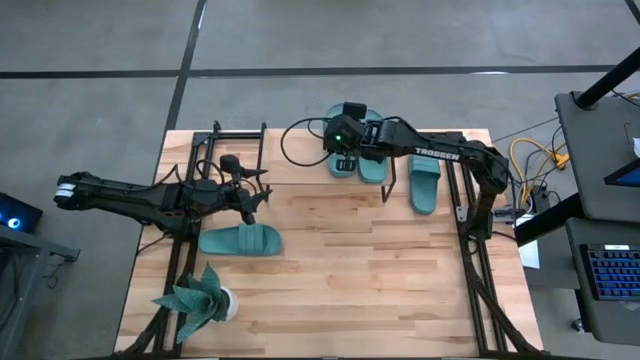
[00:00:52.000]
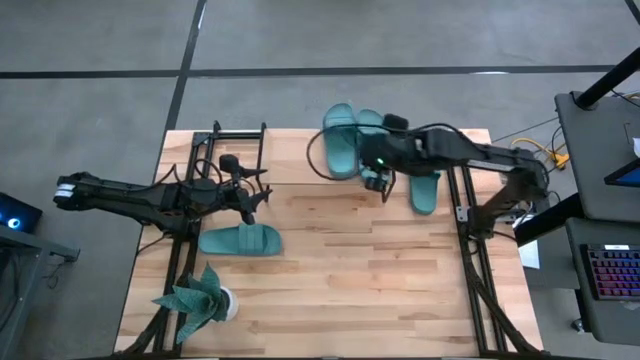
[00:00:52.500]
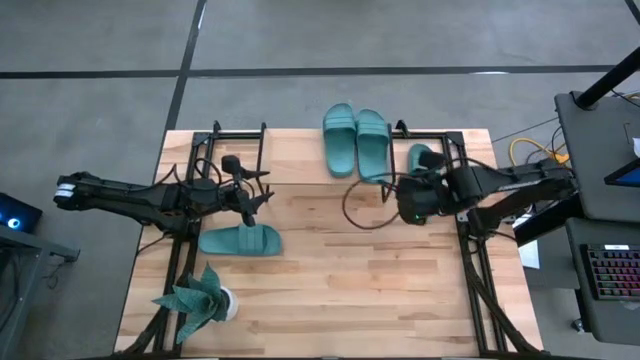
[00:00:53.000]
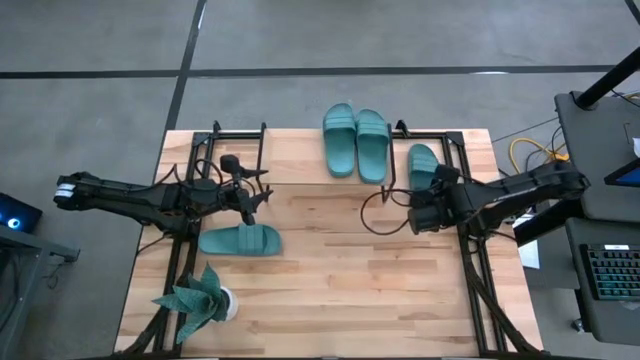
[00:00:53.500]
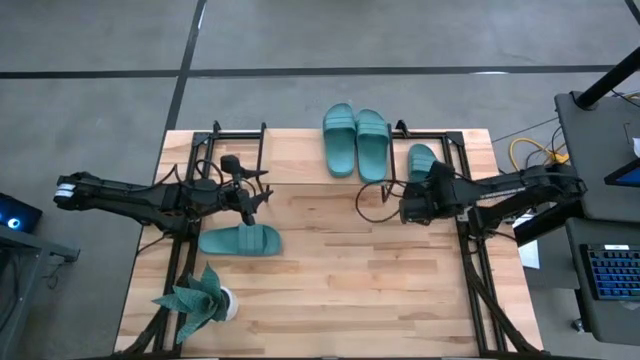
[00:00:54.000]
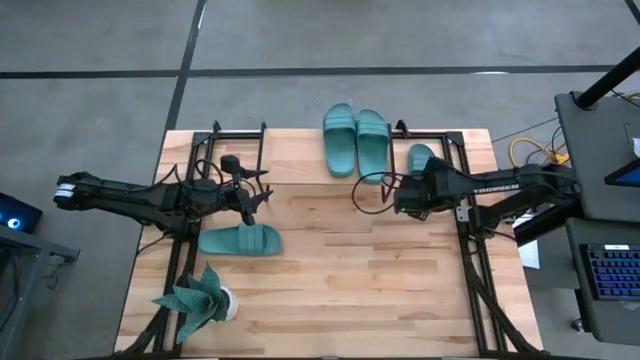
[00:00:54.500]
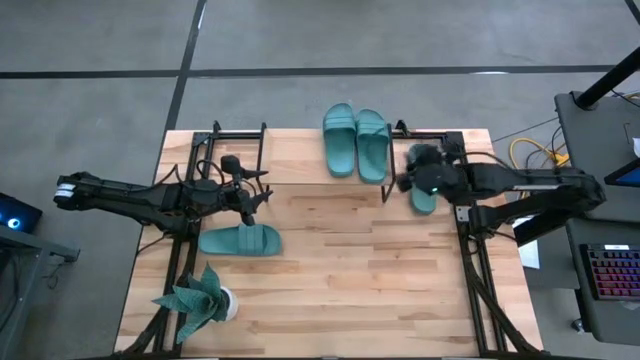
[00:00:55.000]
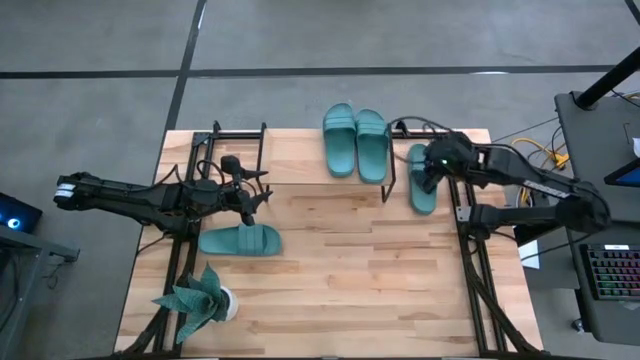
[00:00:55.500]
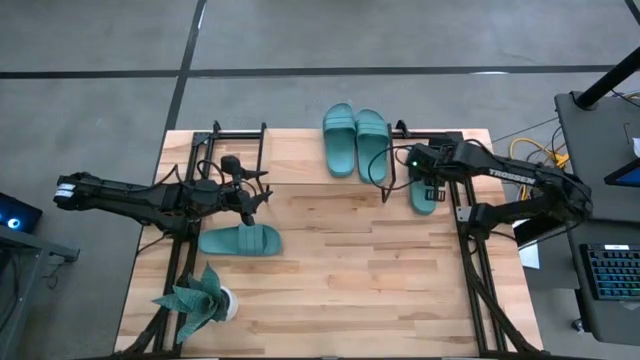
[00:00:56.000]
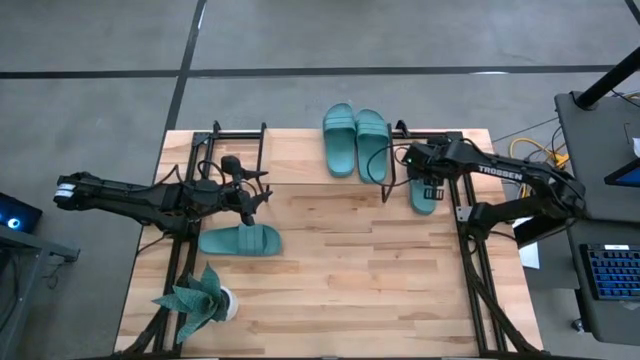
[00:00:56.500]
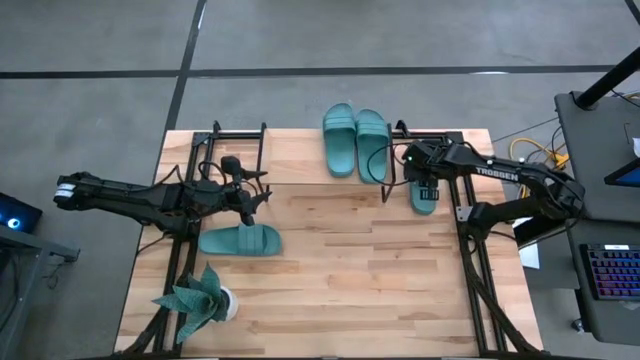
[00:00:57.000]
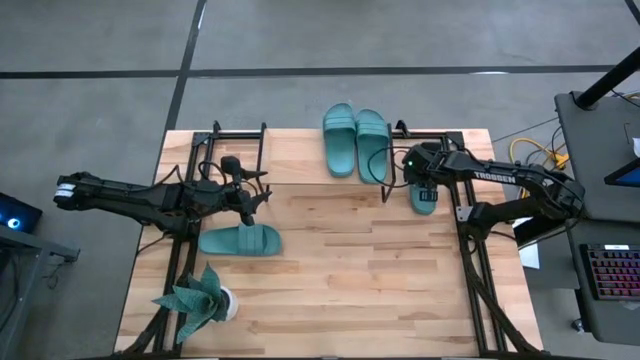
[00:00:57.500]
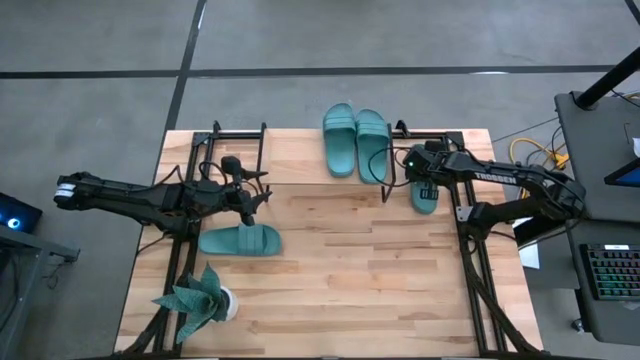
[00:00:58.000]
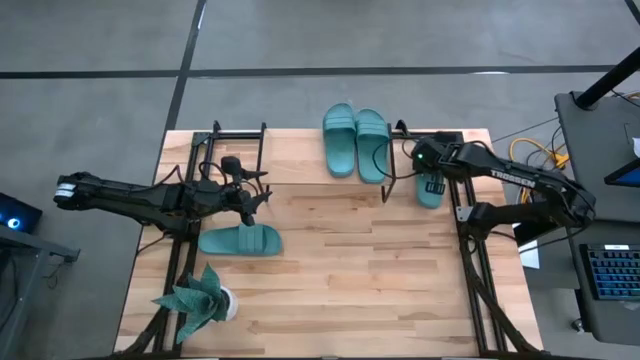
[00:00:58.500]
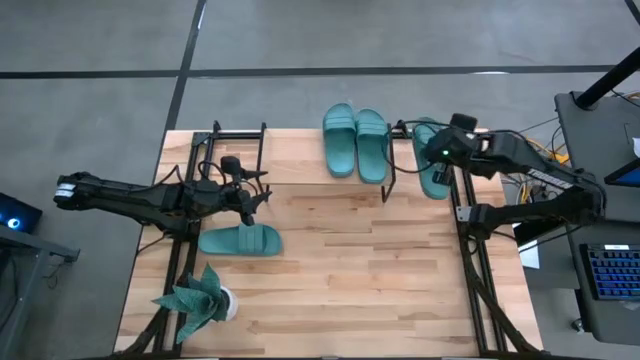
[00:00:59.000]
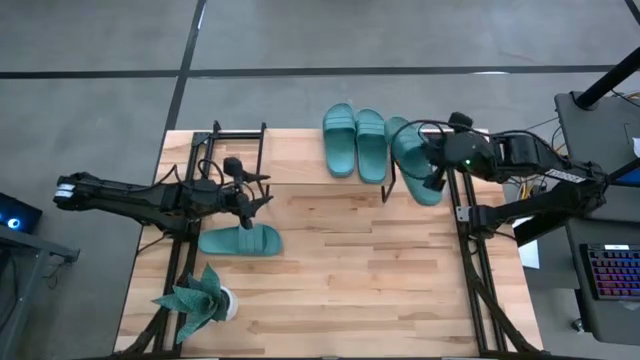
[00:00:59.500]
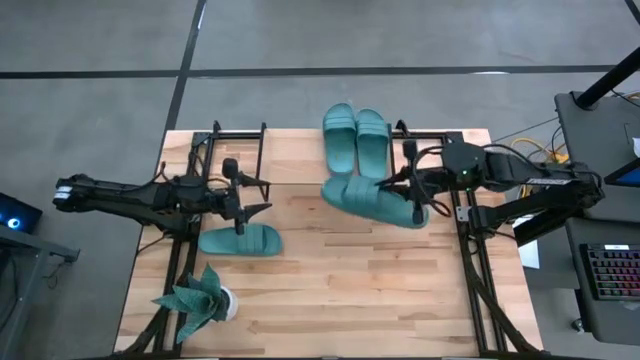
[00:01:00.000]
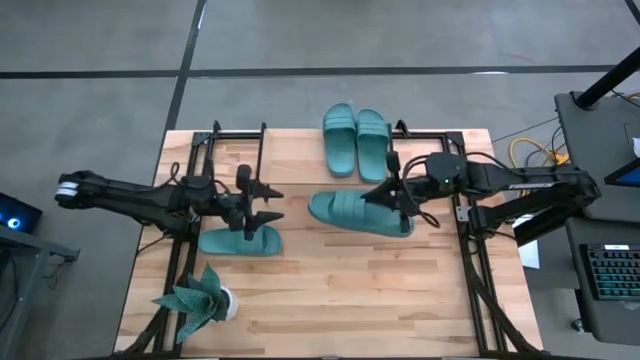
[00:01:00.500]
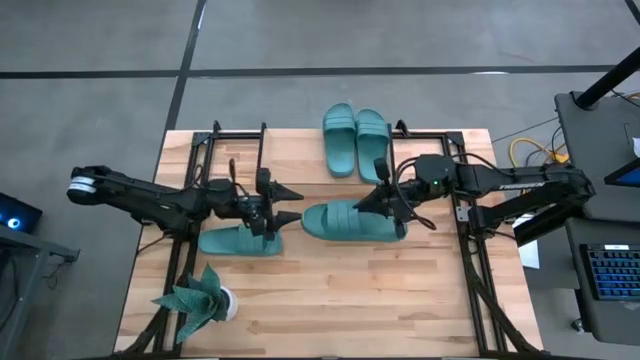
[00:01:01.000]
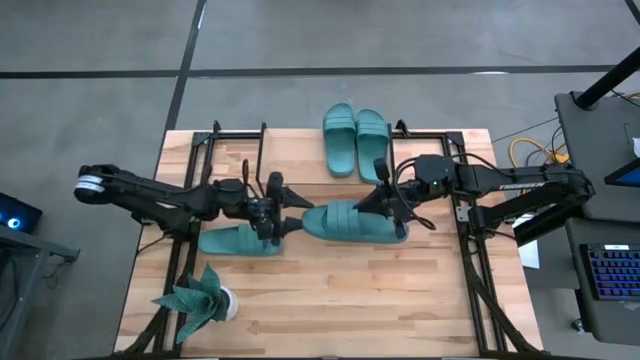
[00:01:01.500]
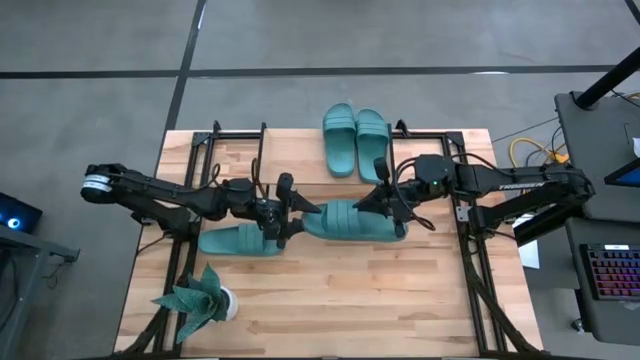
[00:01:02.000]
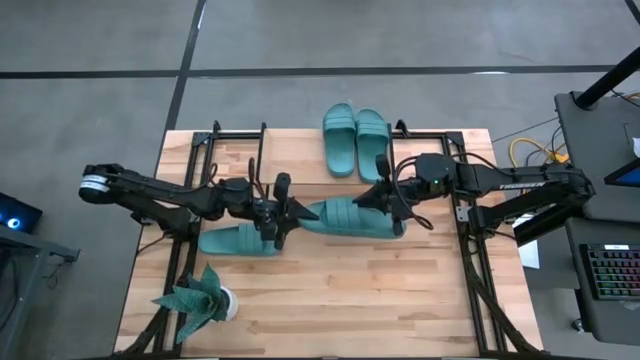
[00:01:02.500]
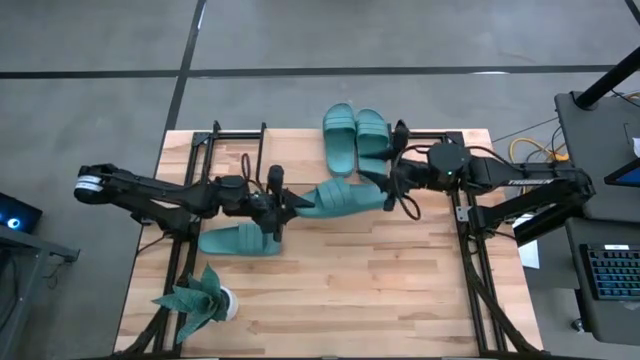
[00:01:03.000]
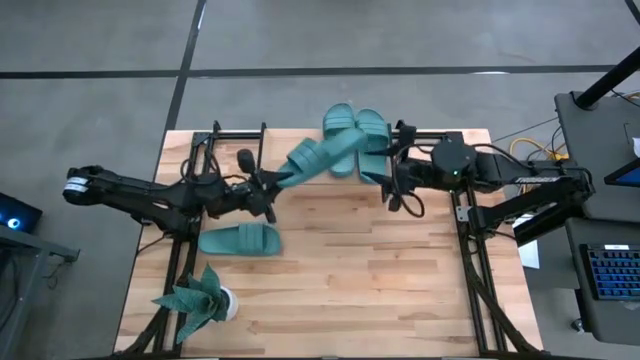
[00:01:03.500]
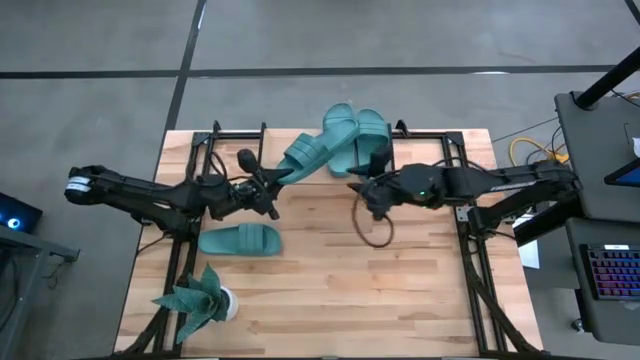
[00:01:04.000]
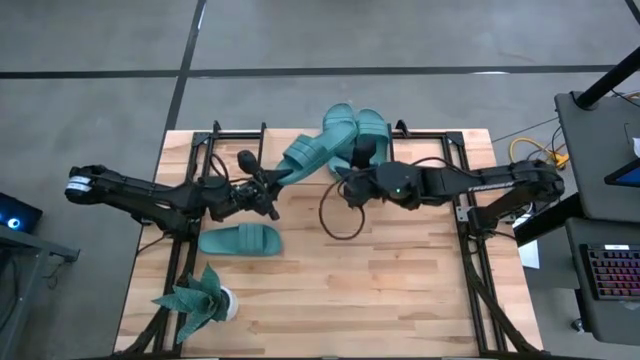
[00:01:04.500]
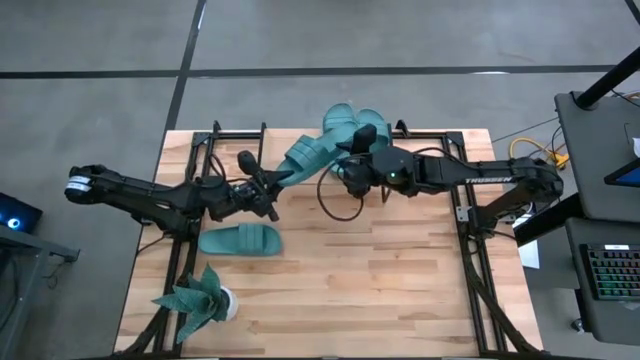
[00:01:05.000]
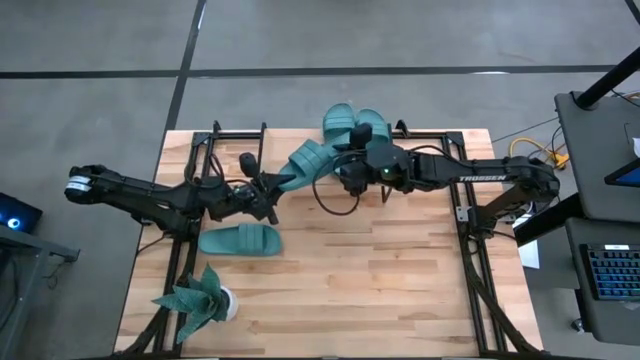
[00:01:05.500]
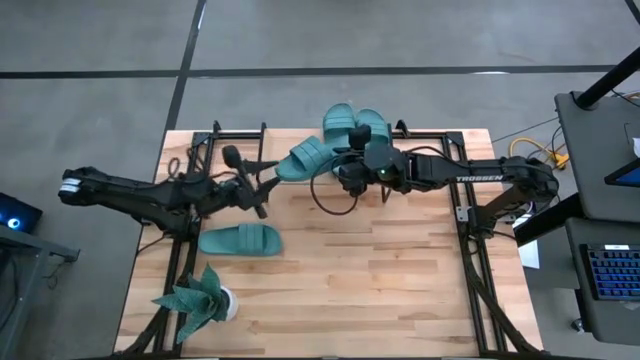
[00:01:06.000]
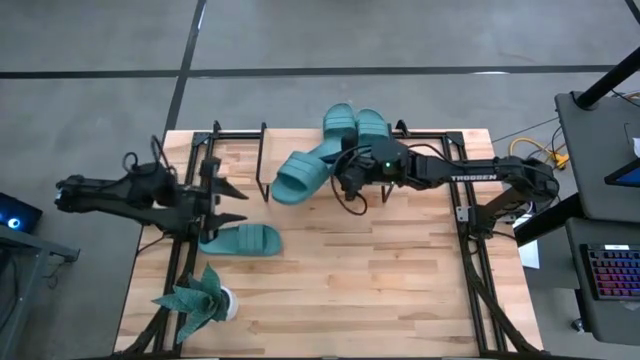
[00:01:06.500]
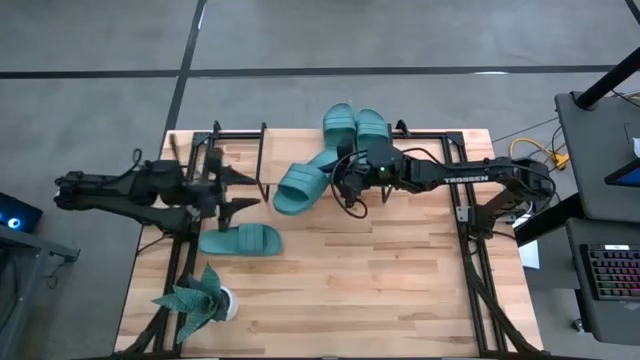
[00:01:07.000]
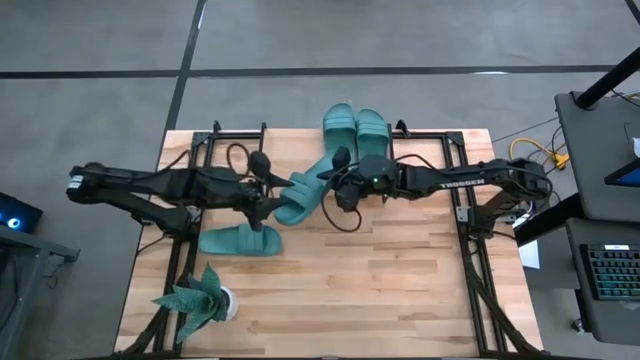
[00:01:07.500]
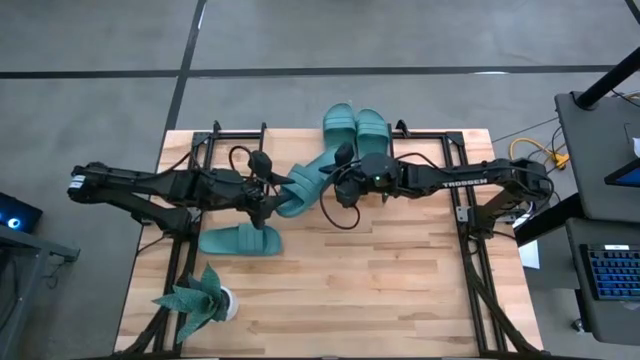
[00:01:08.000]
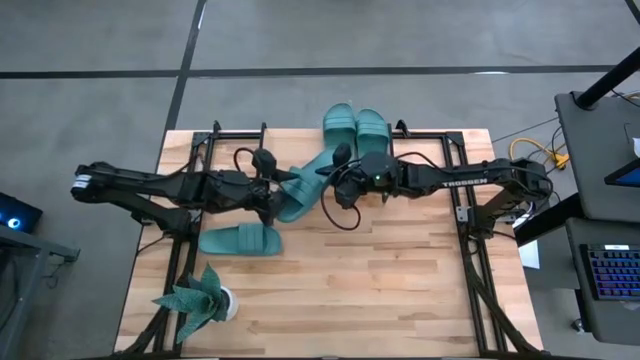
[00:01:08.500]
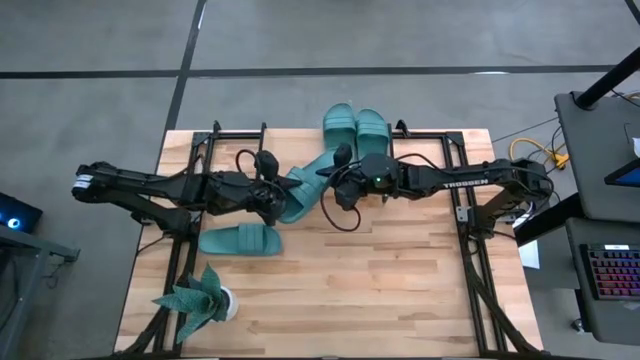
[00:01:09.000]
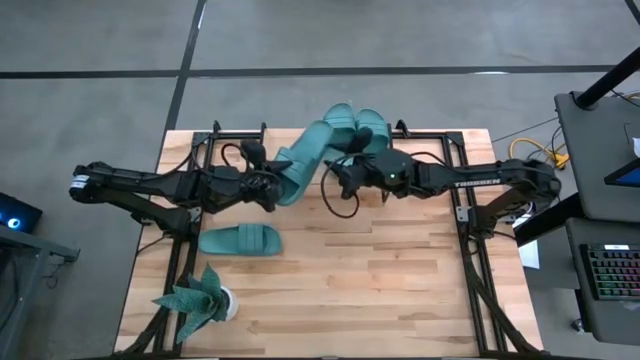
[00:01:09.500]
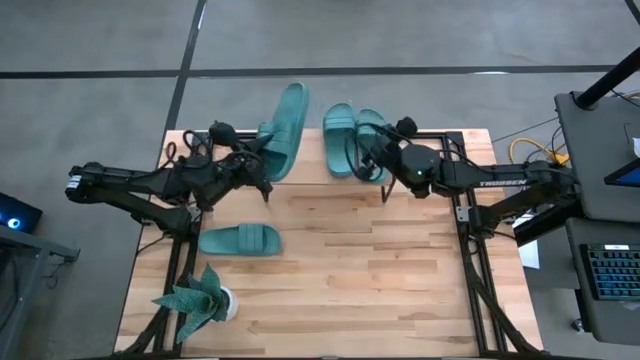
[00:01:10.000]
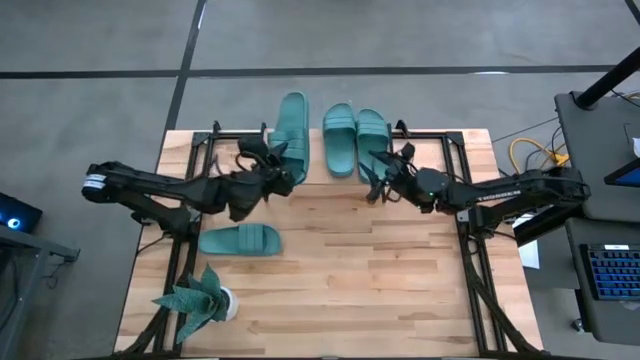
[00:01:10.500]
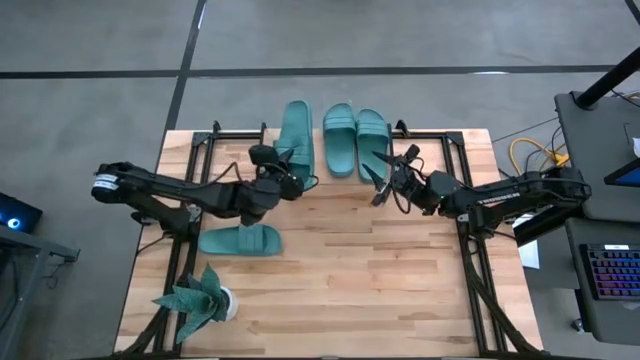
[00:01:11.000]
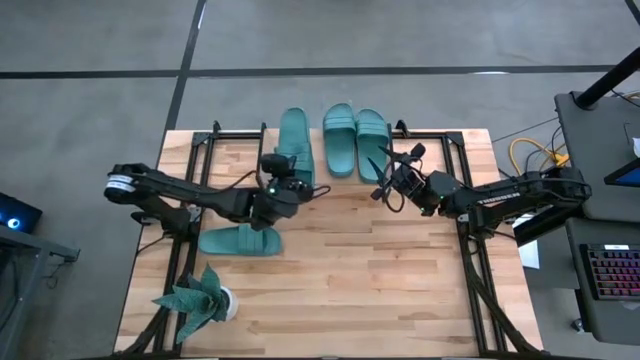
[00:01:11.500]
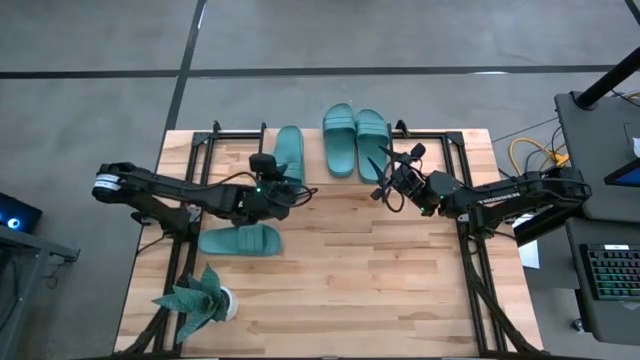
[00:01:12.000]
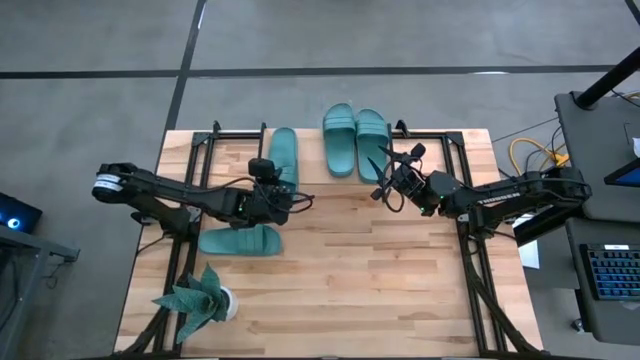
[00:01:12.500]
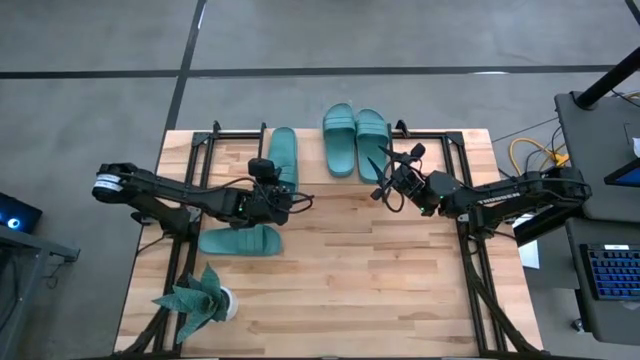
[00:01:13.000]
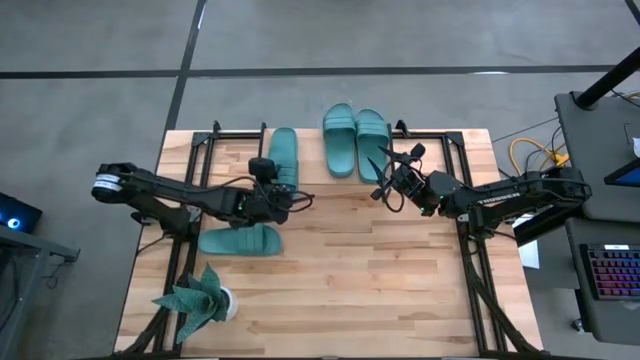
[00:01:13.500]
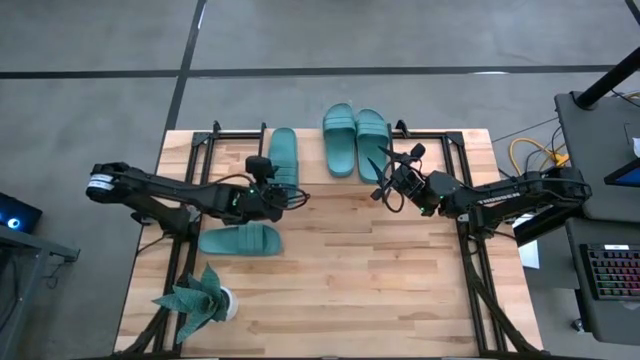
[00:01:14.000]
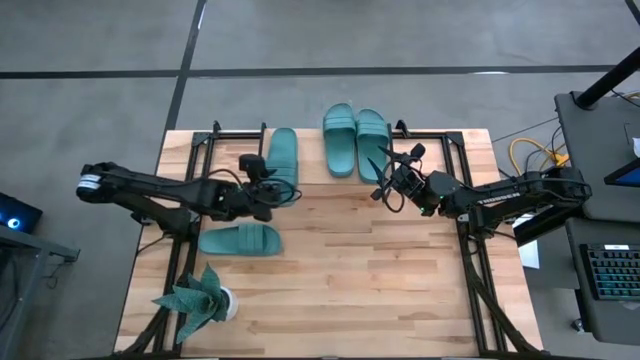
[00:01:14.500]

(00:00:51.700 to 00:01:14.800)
Task: Pick and place slides into the shelf
Put the green slide on the shelf
